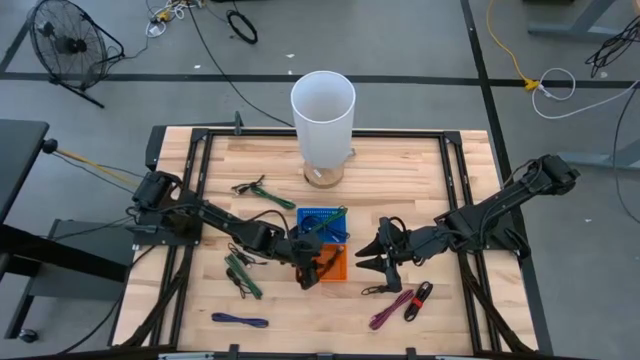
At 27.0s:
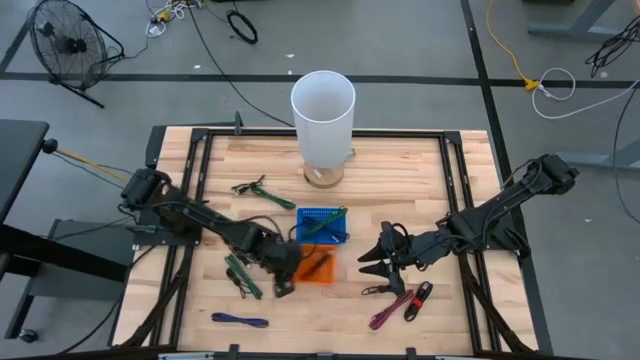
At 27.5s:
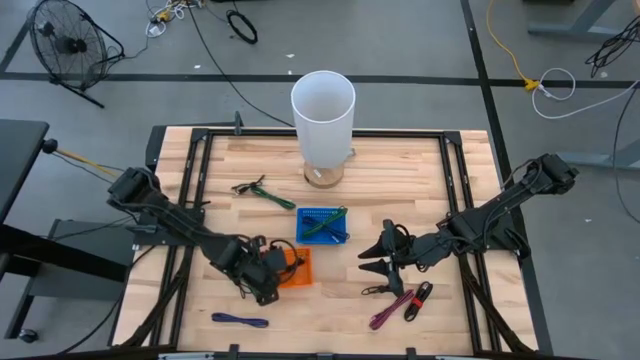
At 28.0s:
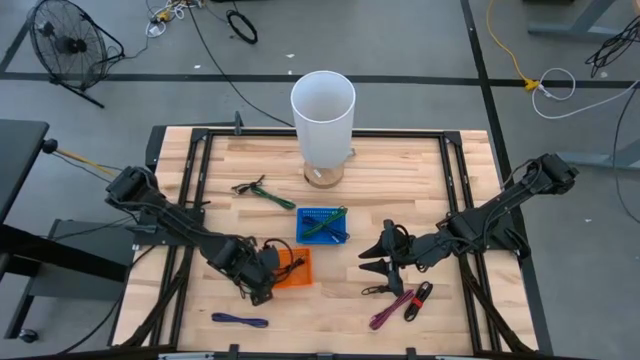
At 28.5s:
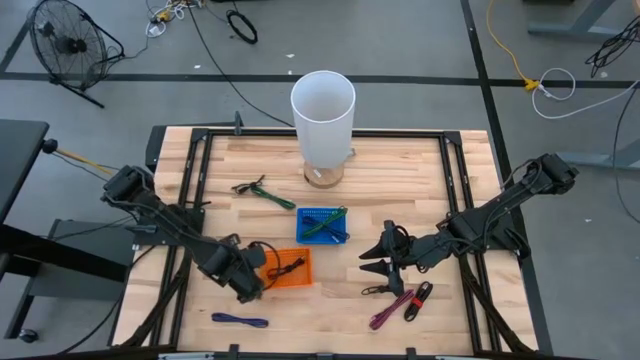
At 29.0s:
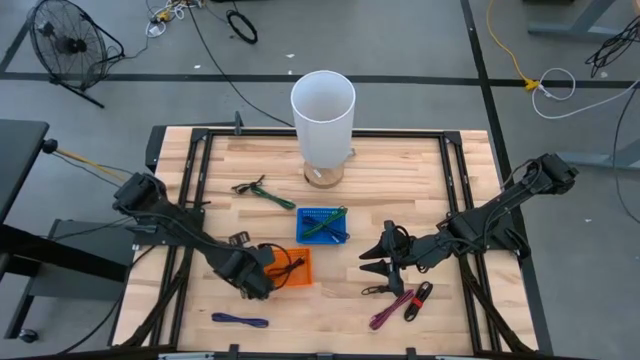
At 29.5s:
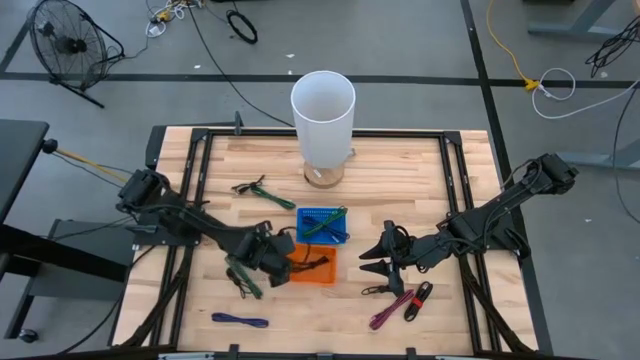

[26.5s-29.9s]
Task: Pick & Place USB Port
Adjust the orange bin

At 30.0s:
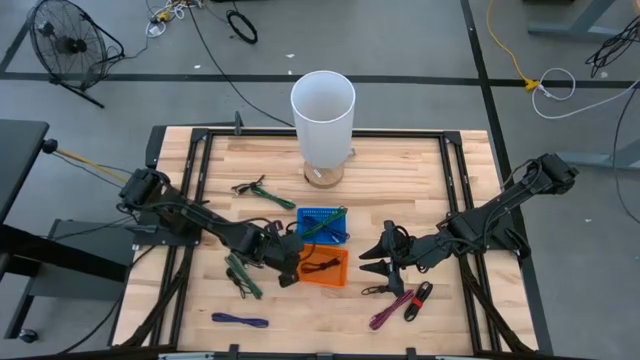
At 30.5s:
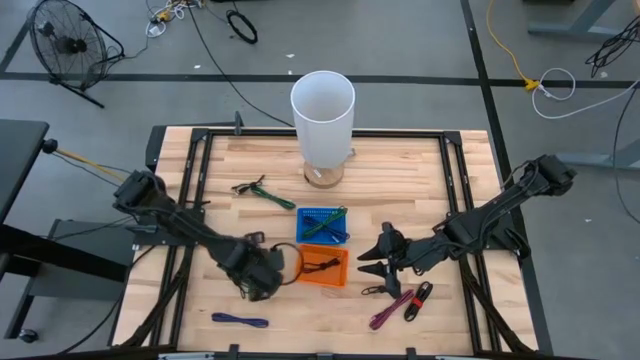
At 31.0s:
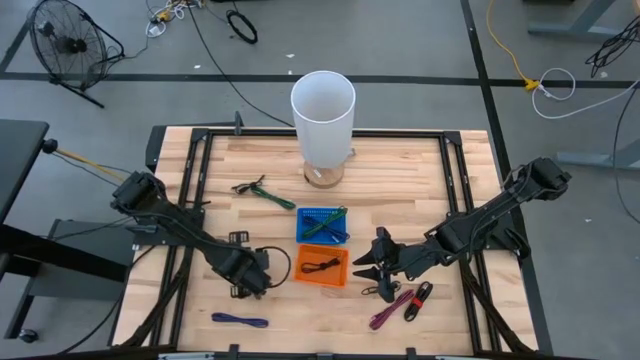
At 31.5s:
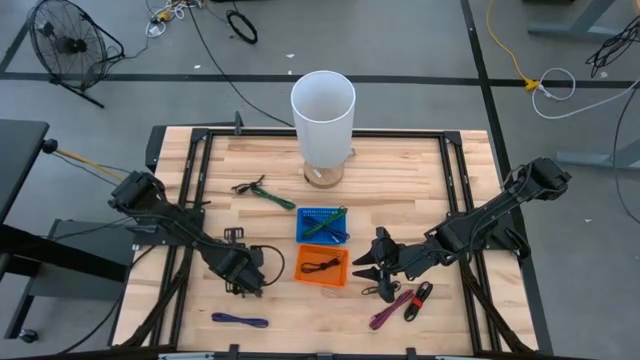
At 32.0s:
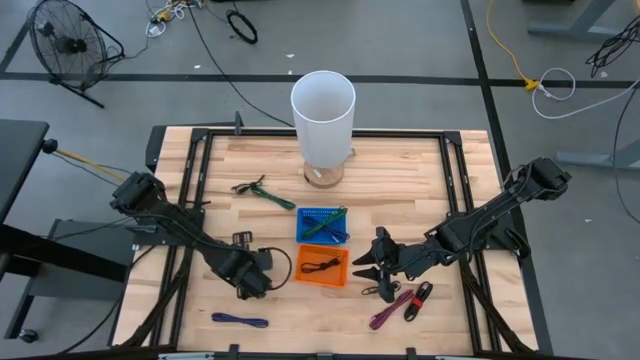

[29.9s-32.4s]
Put the black charger cable into the orange bin

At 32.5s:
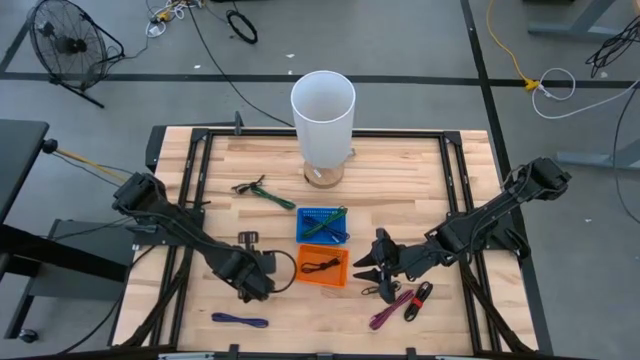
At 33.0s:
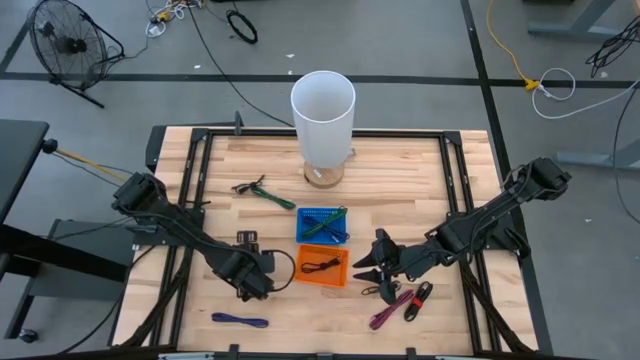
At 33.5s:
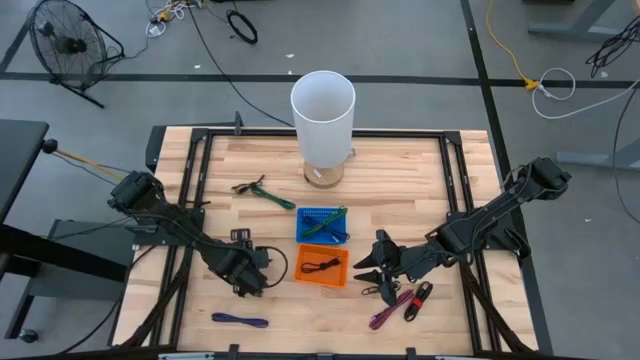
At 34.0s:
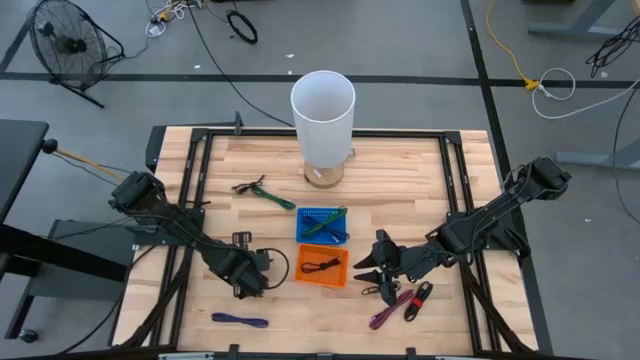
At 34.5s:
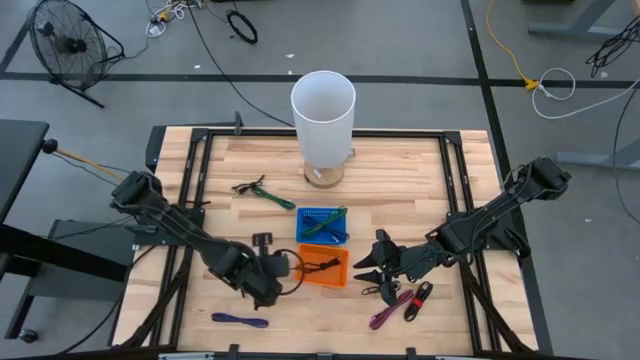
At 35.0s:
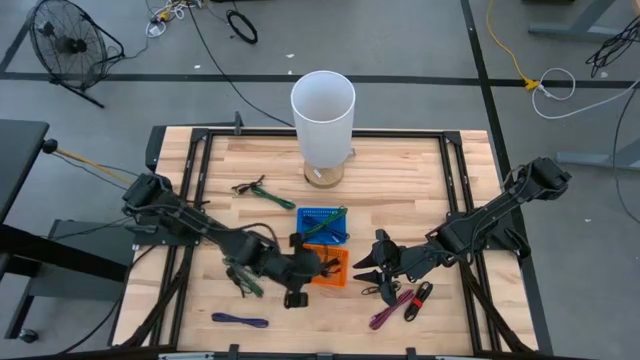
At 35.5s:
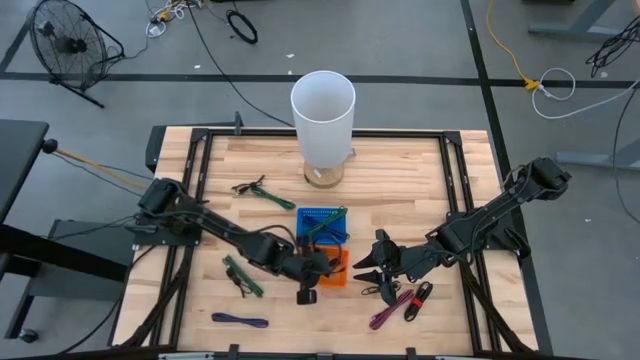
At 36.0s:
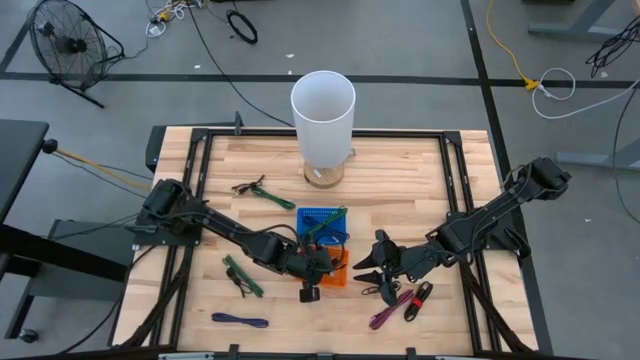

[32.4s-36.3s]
Put the black charger cable into the orange bin

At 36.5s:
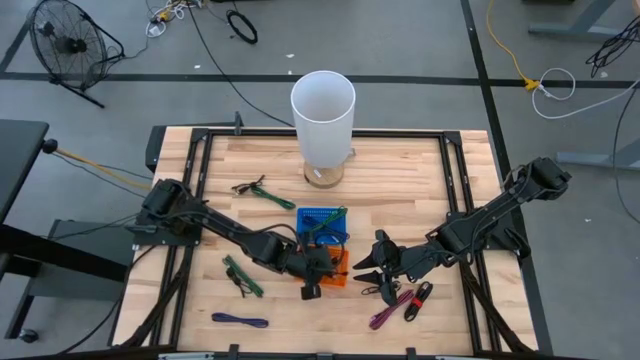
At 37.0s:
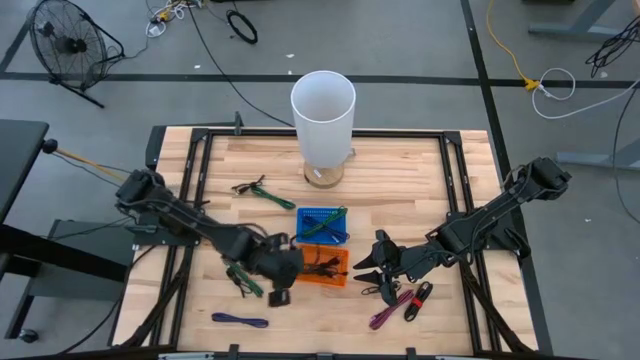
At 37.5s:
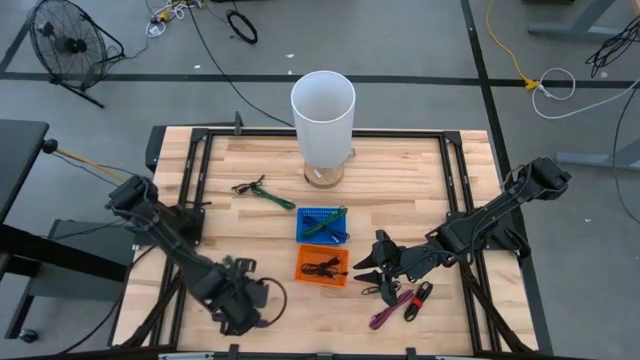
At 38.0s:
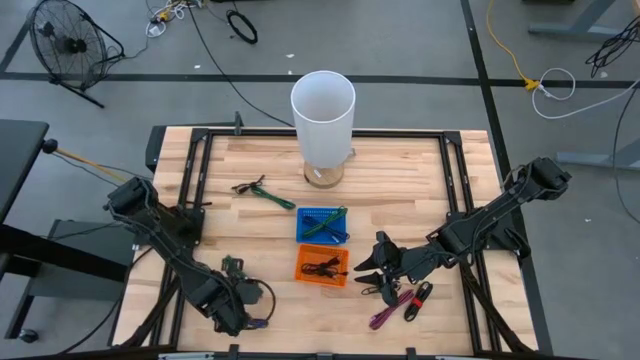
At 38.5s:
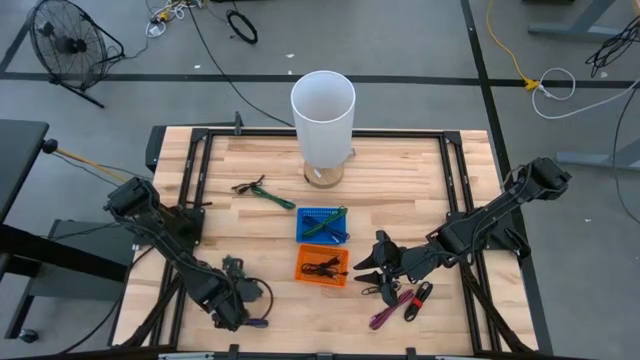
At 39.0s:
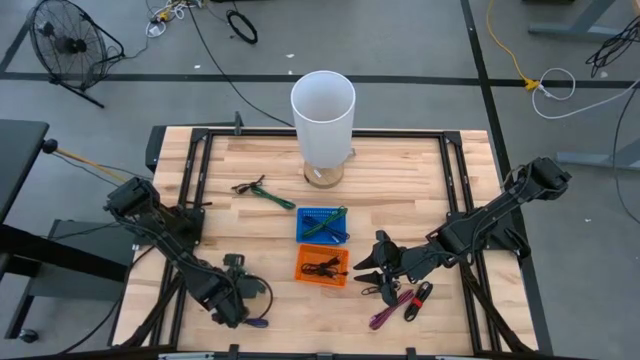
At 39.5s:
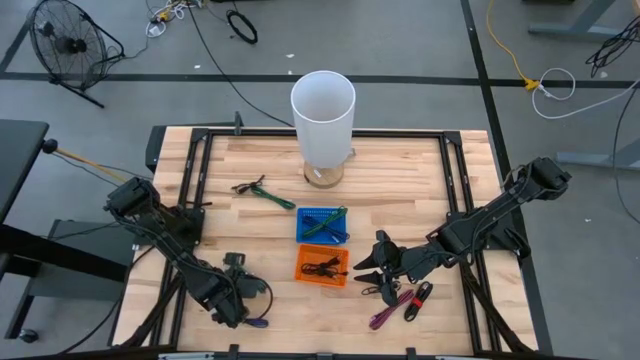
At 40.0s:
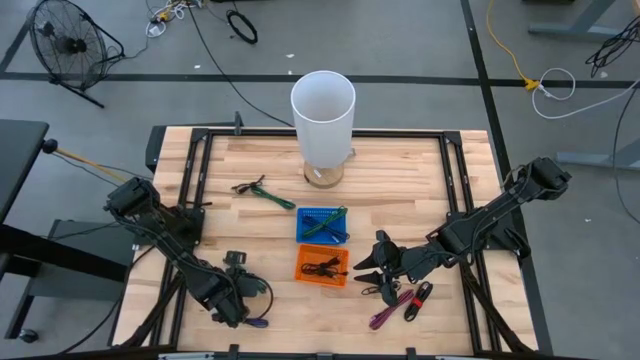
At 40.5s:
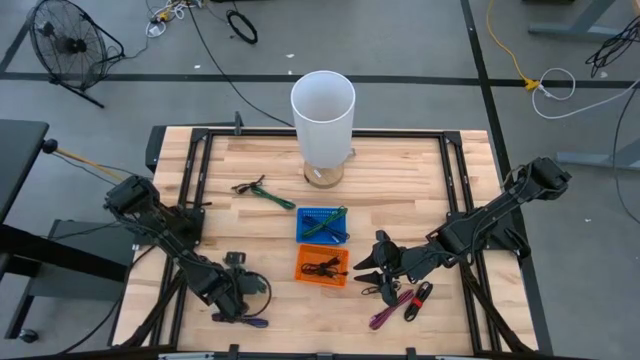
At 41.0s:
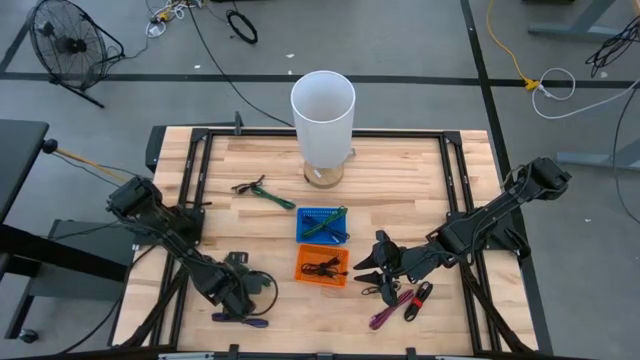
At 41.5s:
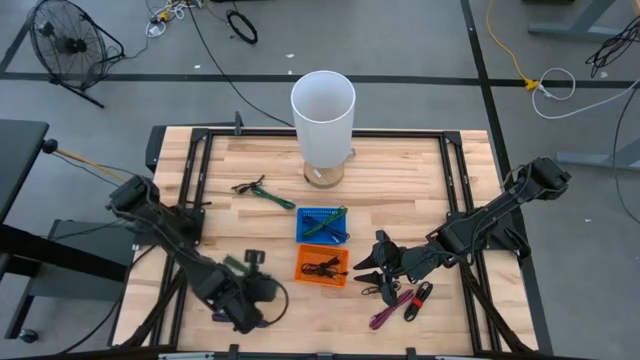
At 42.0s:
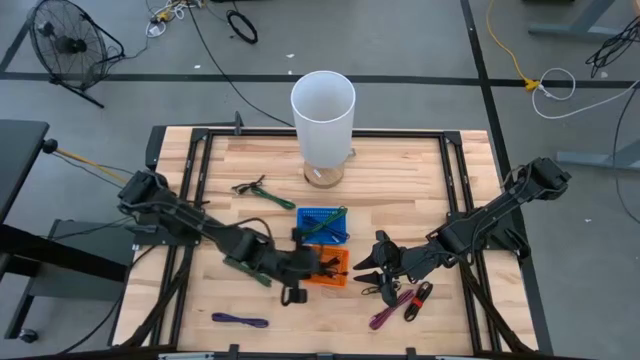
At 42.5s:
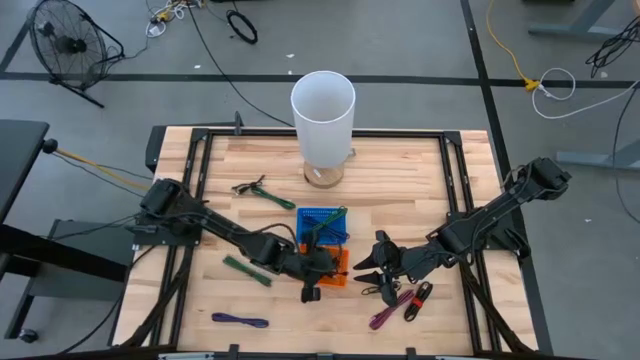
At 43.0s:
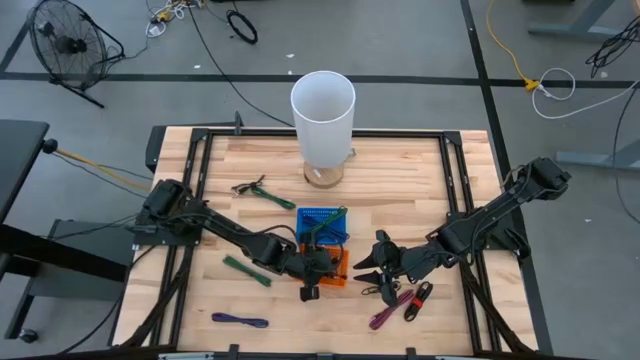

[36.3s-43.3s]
Put the black charger cable into the orange bin

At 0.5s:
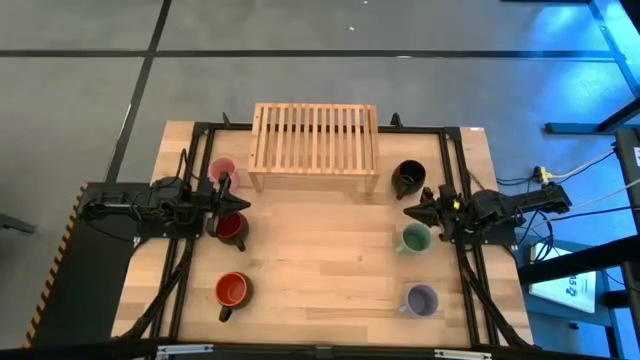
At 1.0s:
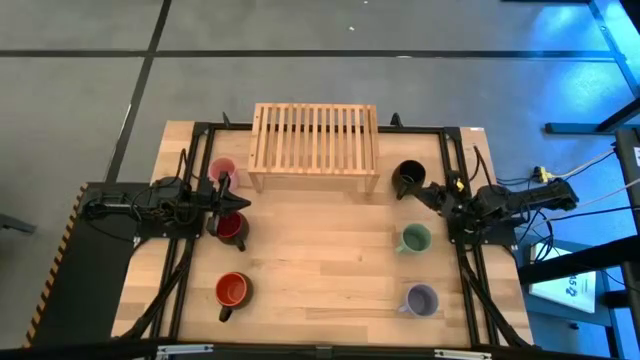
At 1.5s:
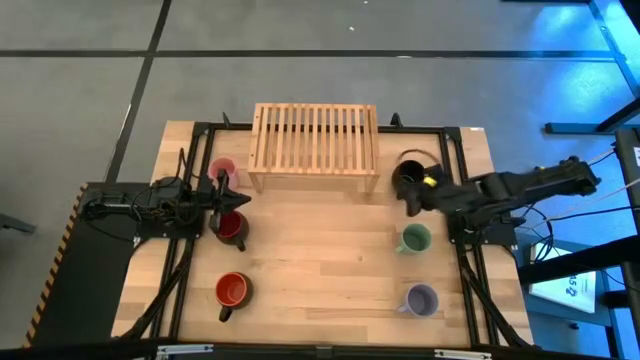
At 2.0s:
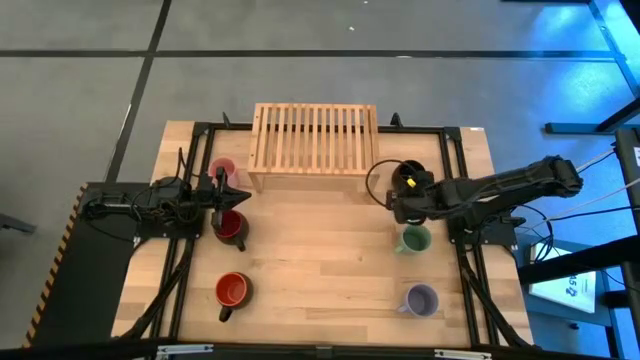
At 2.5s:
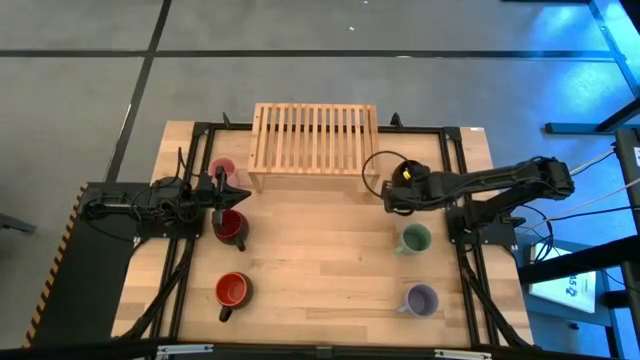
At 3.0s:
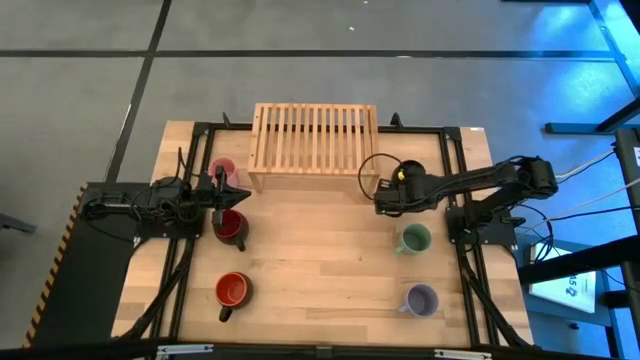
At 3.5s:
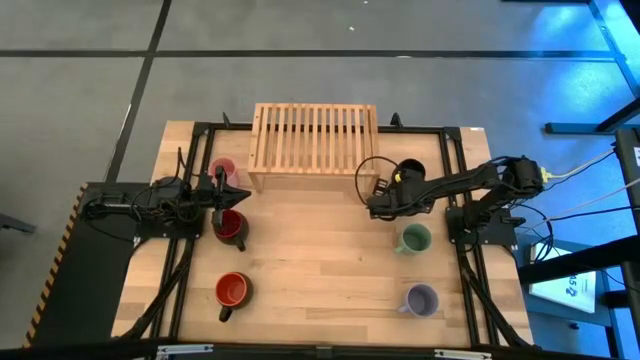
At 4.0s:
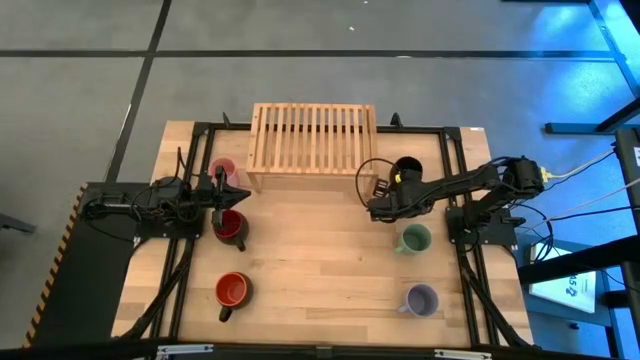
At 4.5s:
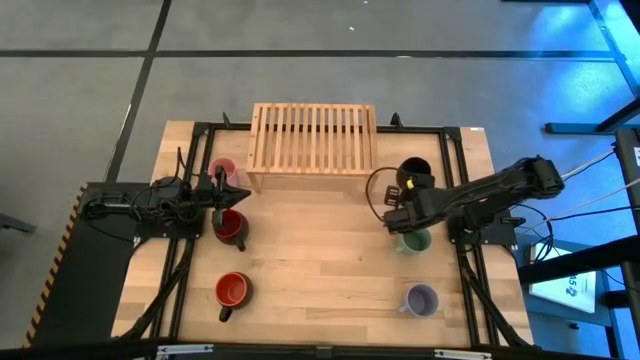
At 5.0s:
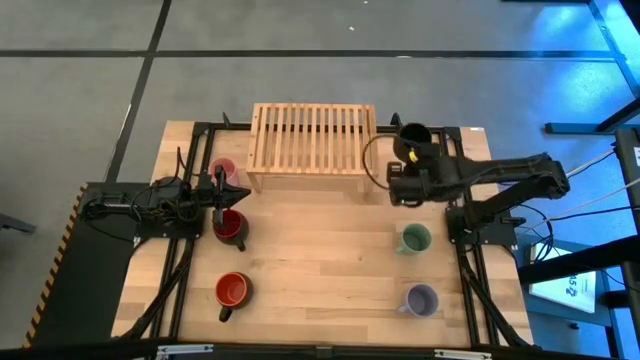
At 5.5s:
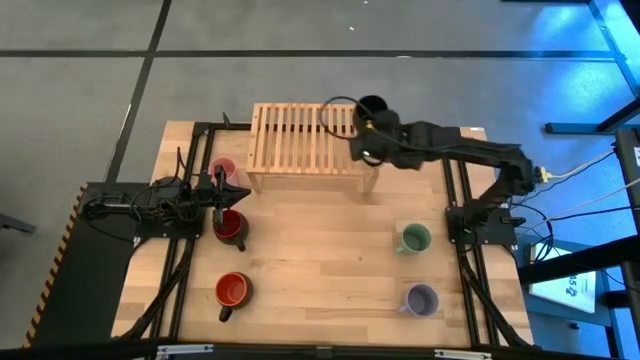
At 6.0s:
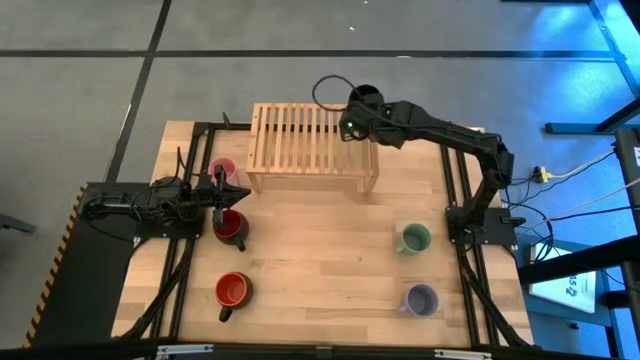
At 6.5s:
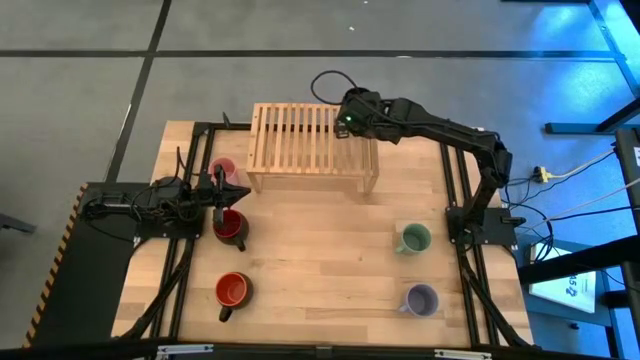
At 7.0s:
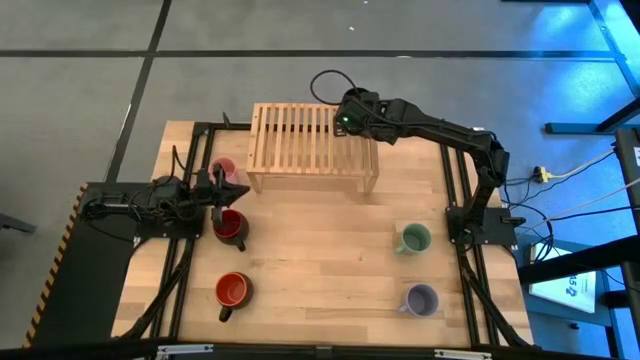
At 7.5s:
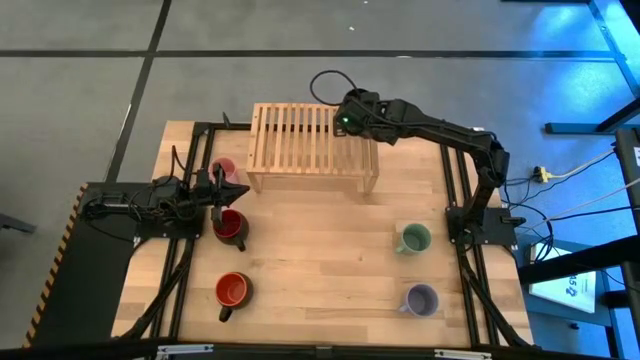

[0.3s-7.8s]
Task: Place coffee mugs
Put the black mug on the shelf
